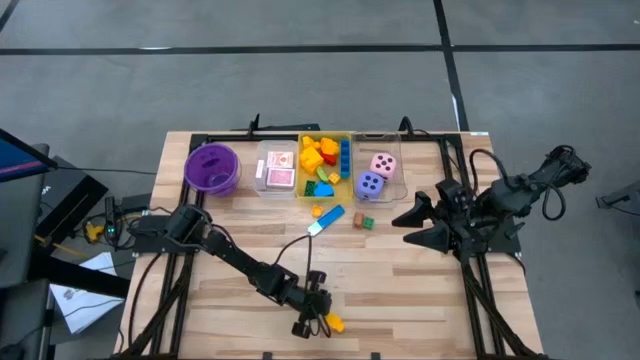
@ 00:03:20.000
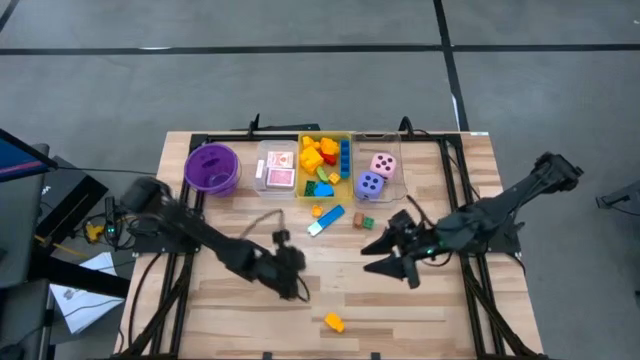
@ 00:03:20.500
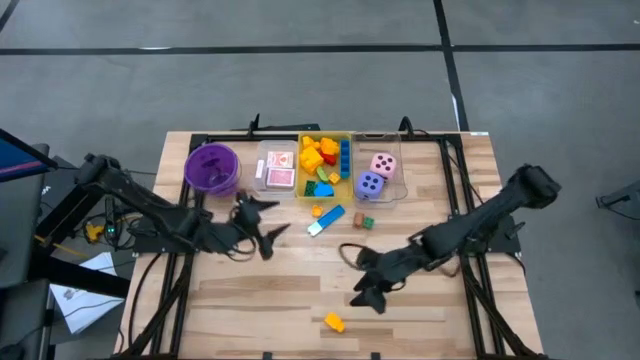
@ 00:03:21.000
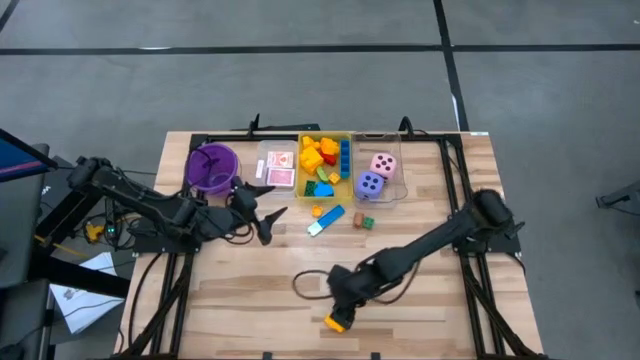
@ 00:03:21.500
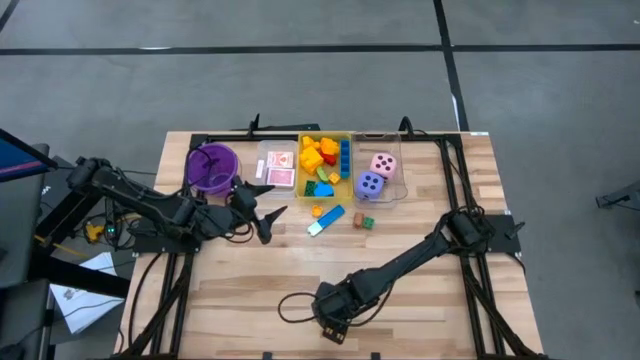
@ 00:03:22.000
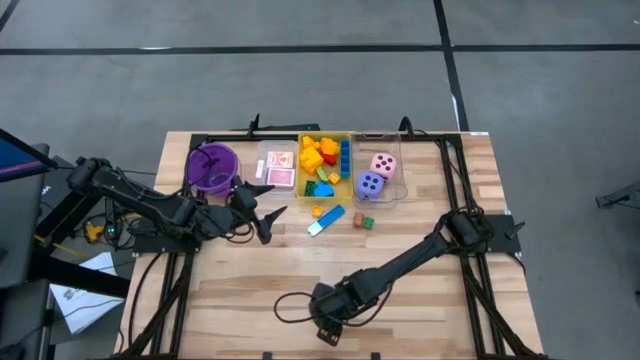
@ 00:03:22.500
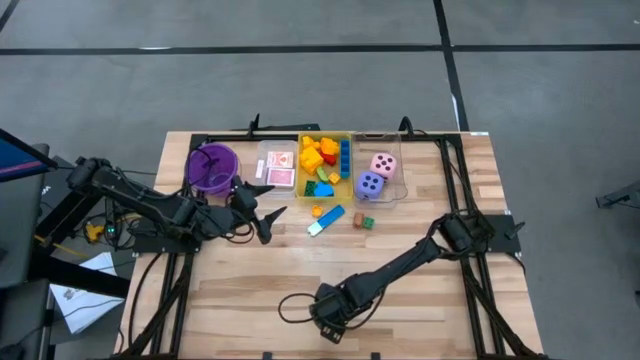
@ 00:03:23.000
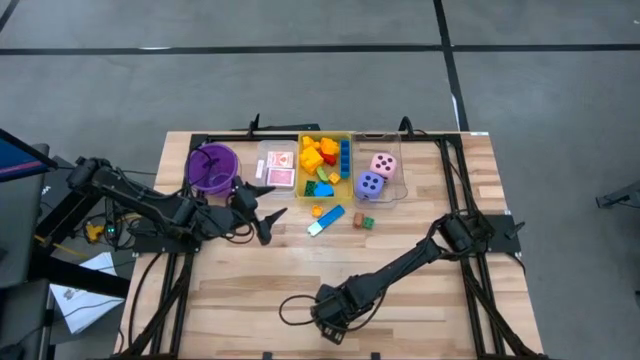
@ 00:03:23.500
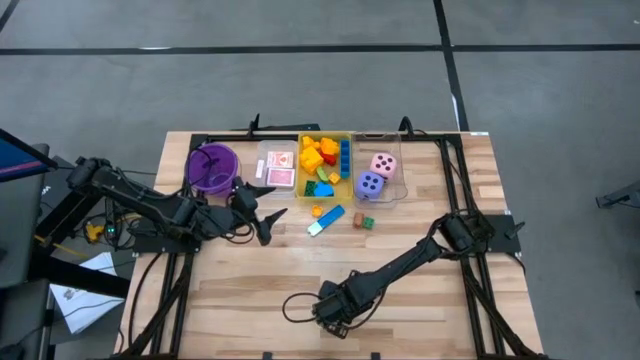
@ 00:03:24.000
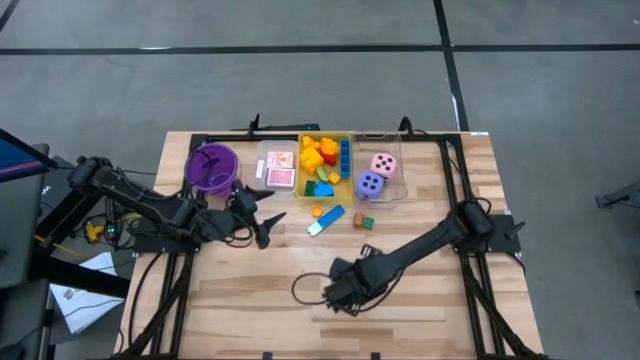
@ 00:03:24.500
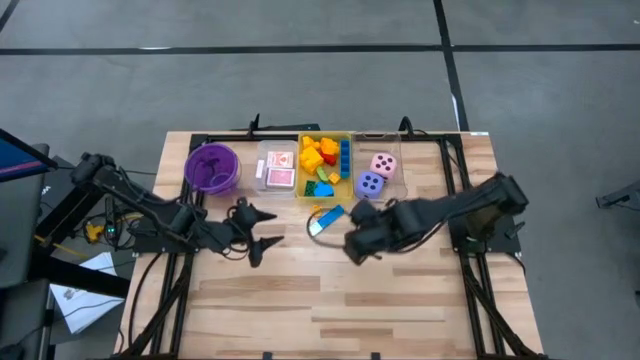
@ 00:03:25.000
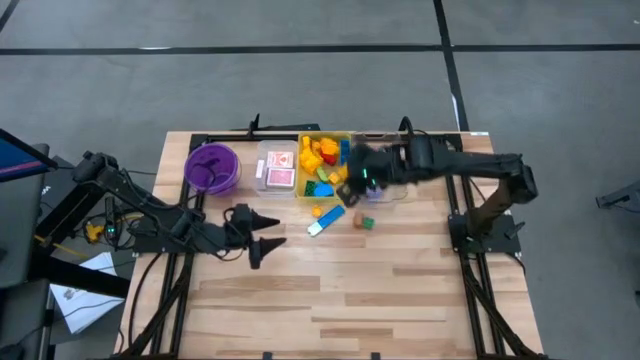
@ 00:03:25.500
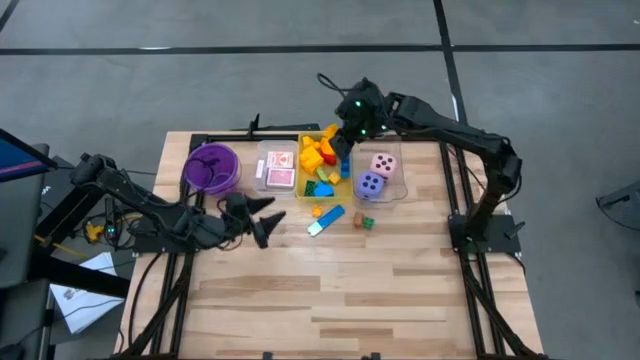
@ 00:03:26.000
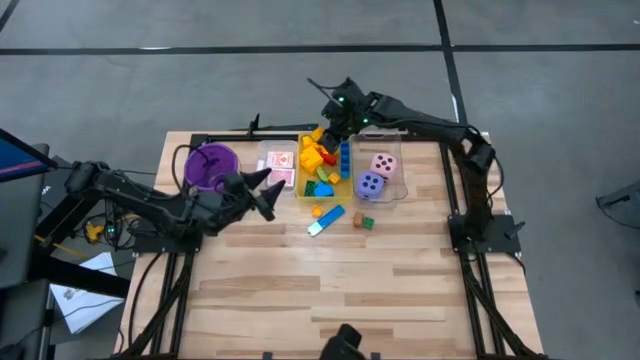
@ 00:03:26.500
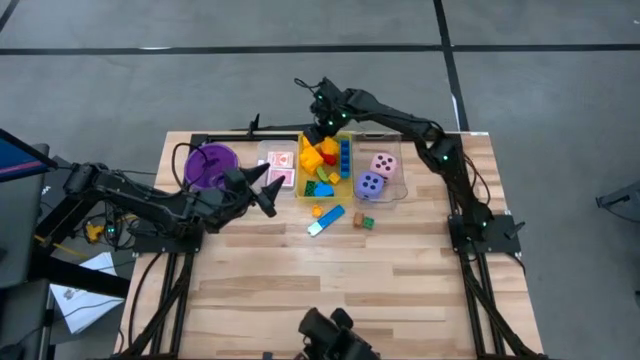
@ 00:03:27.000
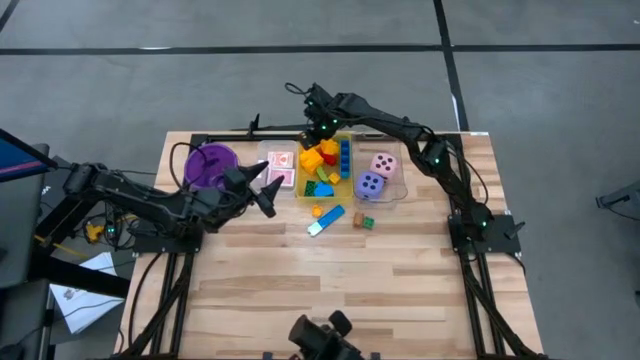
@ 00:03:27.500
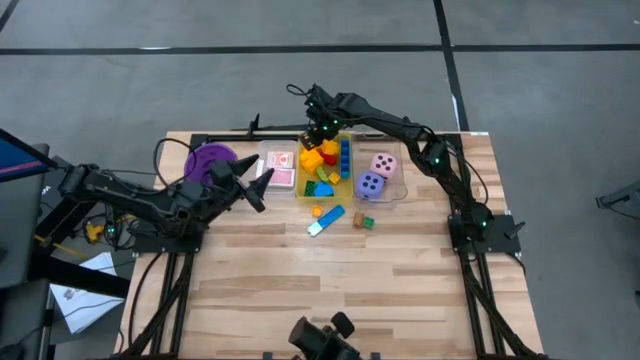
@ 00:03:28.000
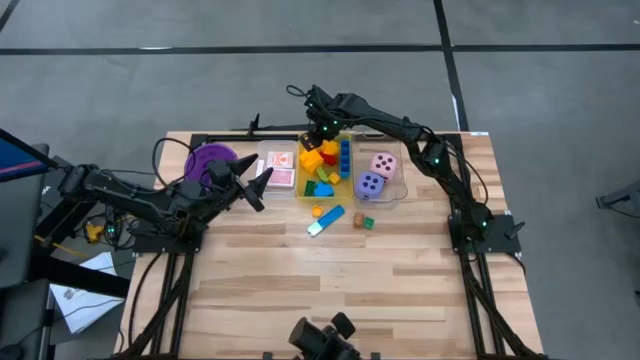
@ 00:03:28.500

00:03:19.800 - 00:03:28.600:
Task: Pick & Place Toys
Put the yellow gamepiece into the yellow bin

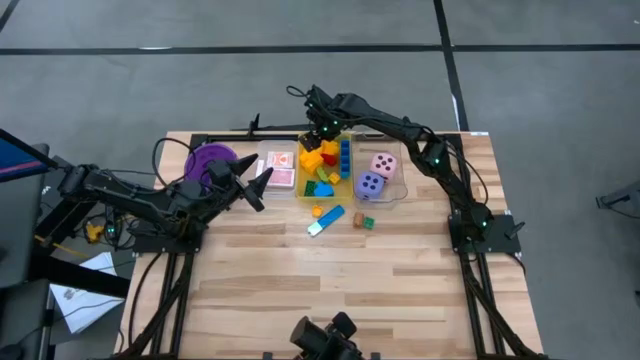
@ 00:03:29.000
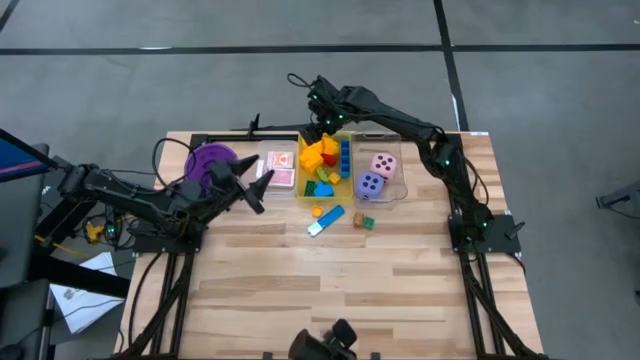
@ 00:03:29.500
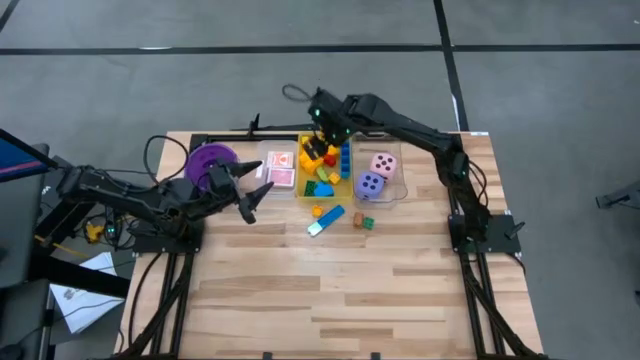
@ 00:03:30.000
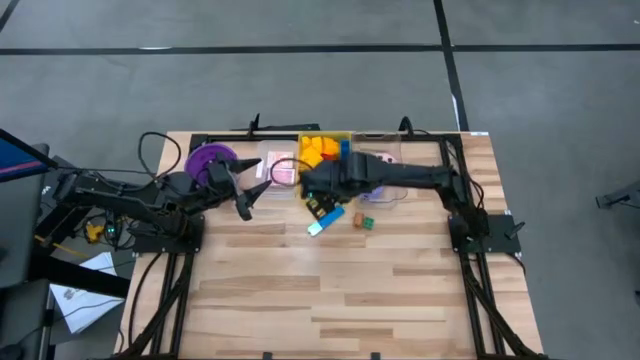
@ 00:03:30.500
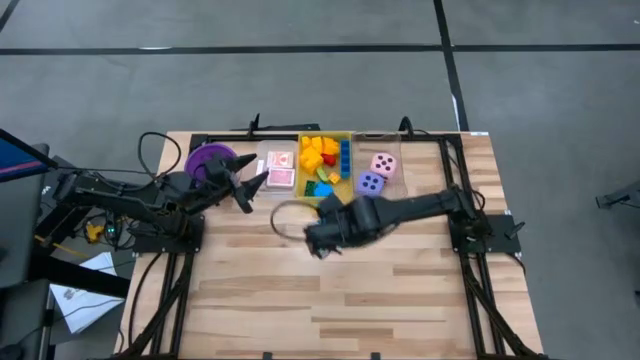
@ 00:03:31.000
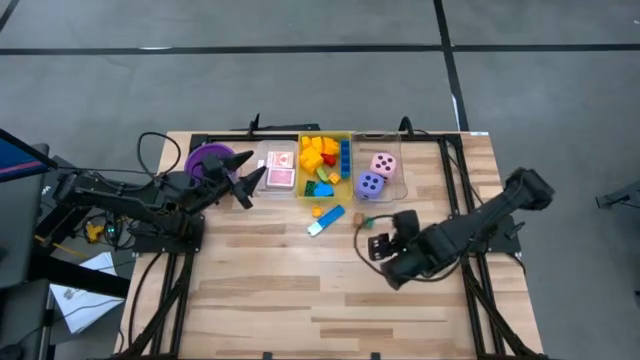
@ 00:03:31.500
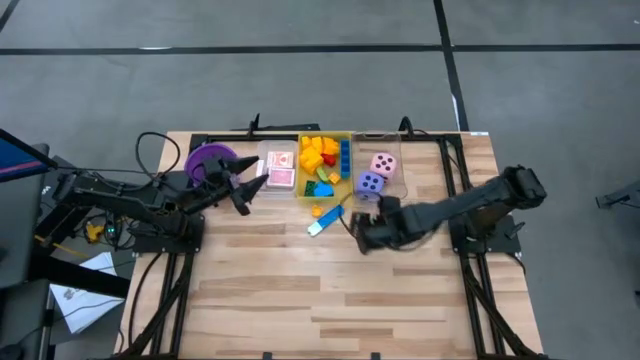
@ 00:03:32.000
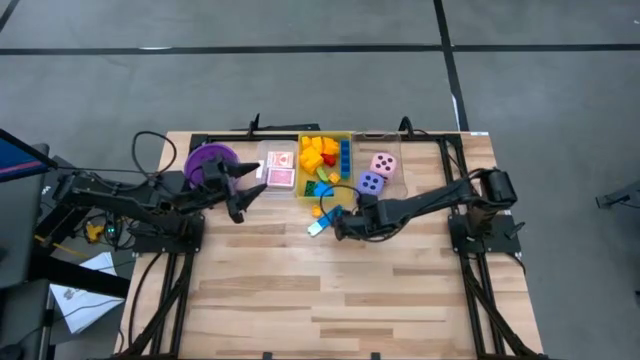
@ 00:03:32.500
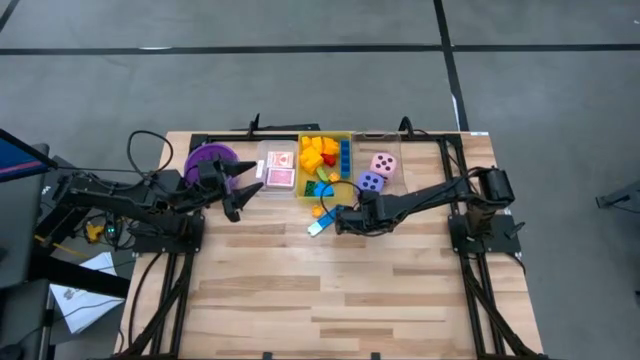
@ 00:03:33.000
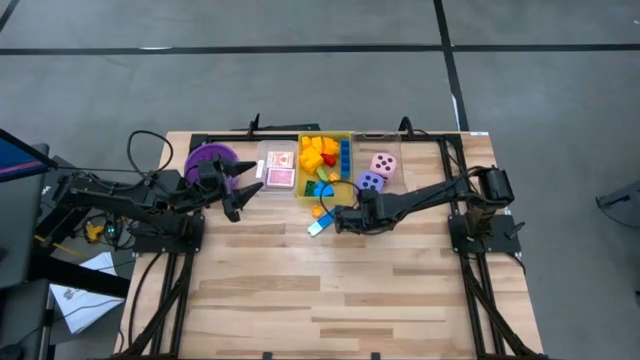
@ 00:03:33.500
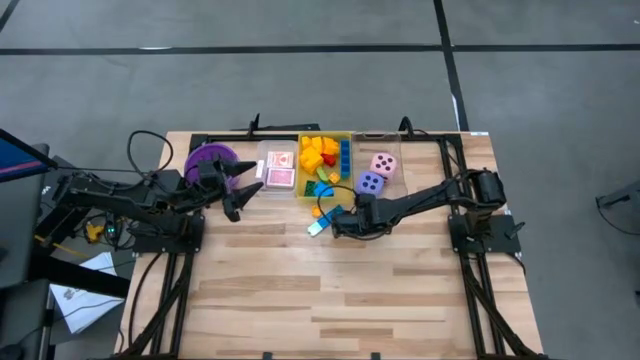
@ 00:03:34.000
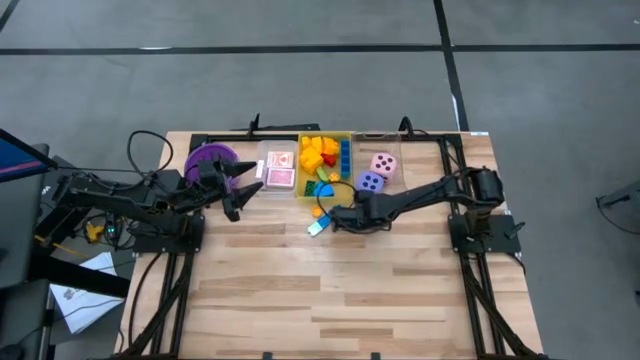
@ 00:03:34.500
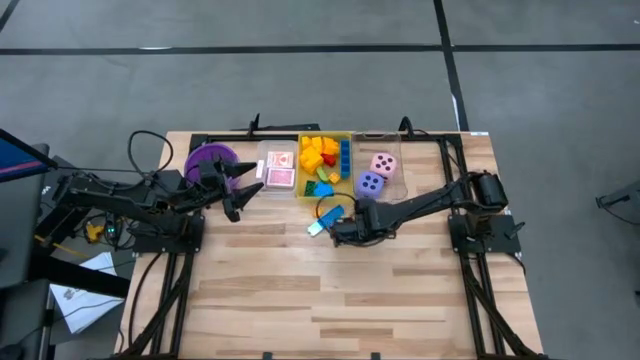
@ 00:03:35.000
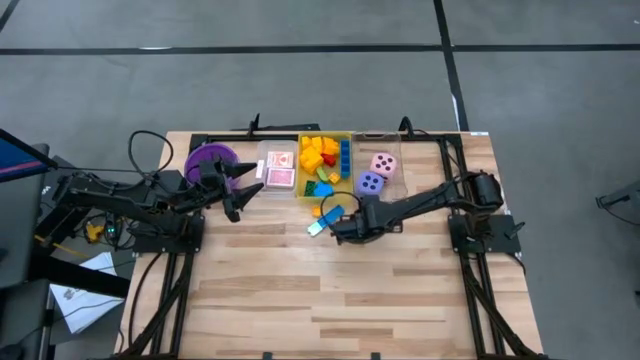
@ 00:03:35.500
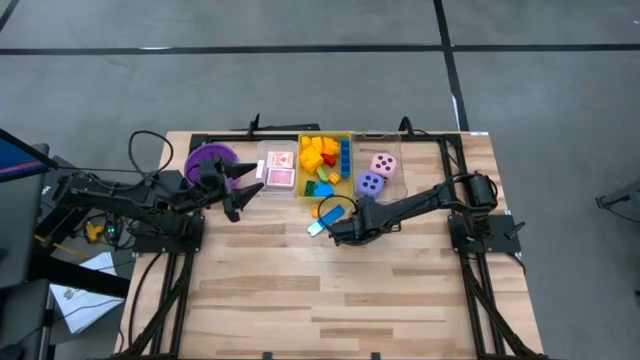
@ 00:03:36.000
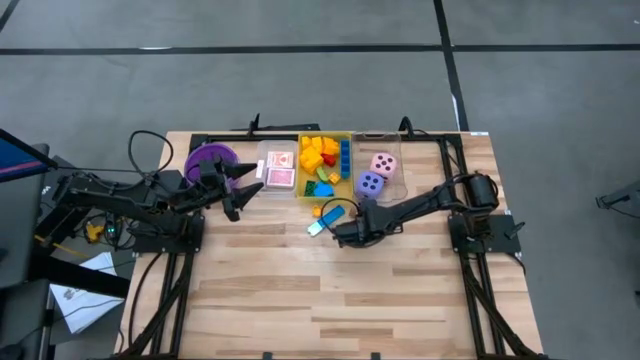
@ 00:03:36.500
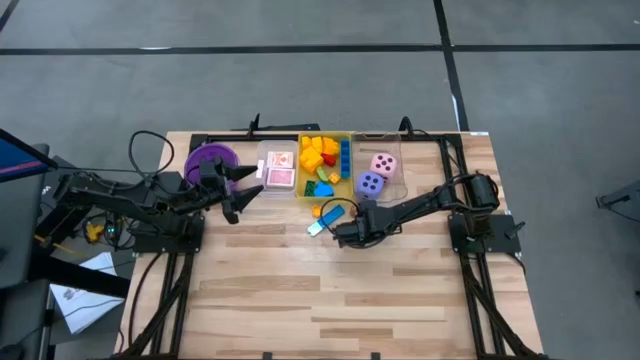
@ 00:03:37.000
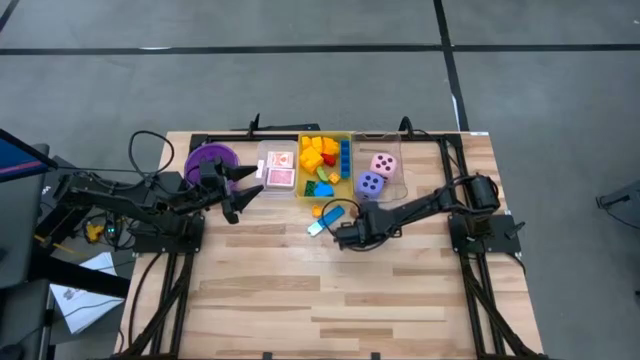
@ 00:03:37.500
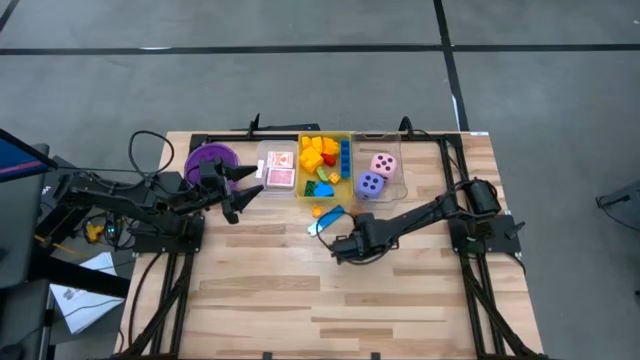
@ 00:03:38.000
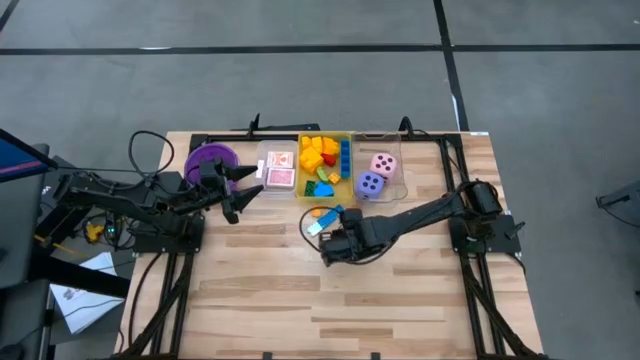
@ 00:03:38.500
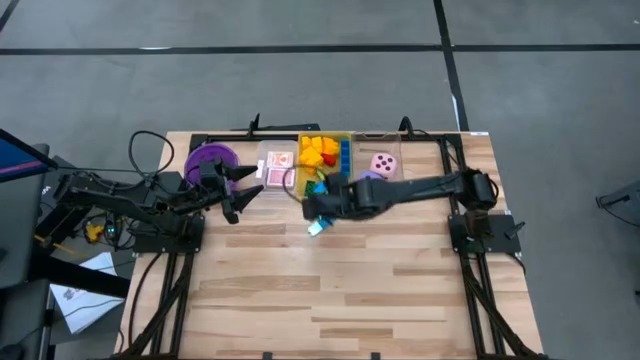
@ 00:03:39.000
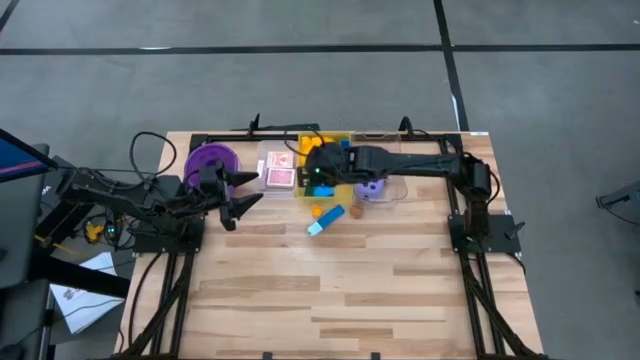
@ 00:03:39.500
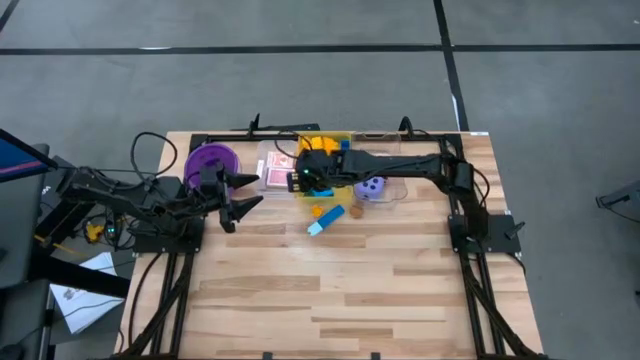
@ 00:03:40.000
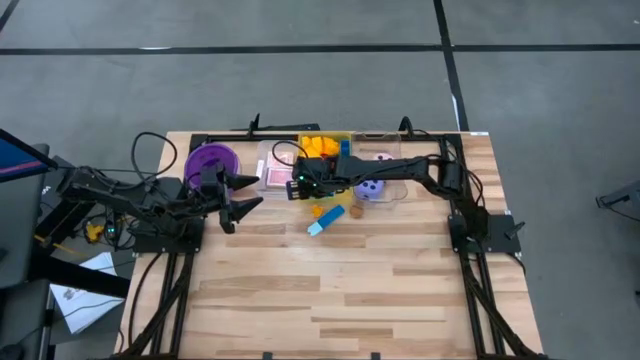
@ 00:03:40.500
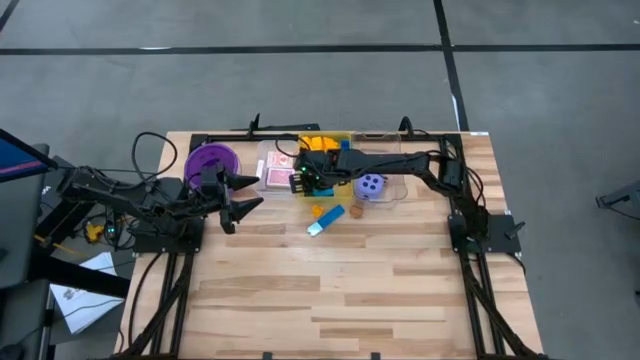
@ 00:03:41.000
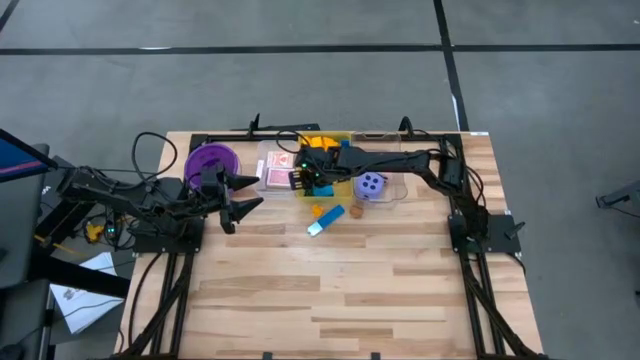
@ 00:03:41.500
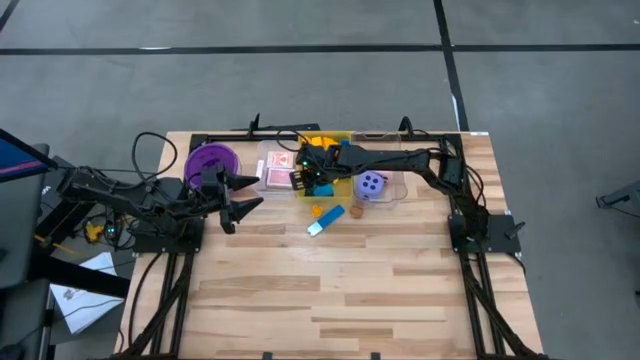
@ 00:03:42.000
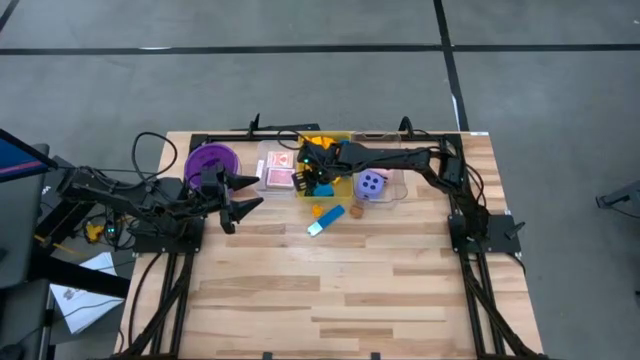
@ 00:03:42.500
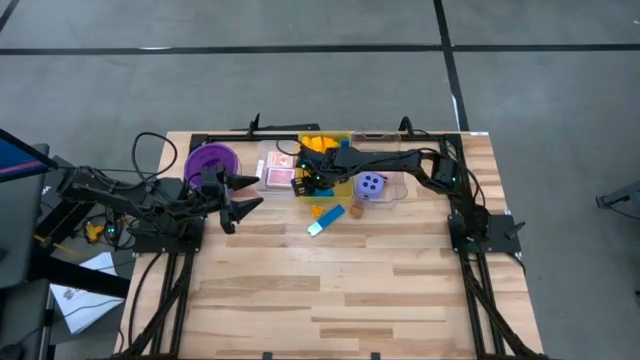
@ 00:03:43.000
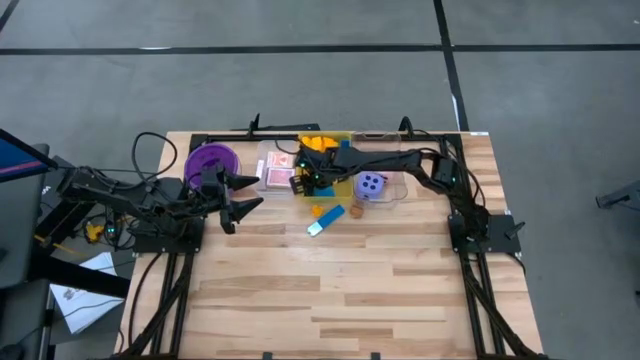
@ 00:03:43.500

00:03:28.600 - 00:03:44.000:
Put the green gamepiece into the yellow bin
